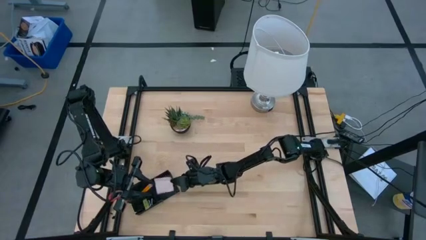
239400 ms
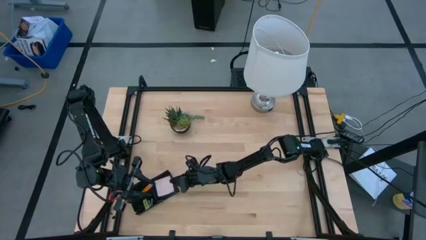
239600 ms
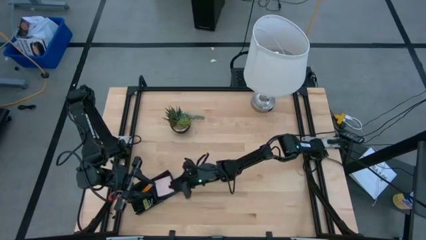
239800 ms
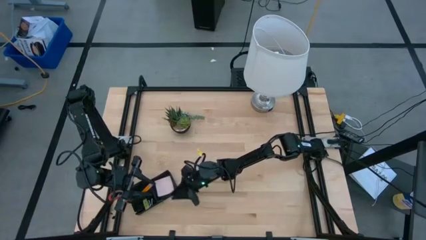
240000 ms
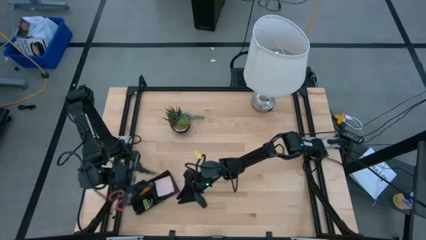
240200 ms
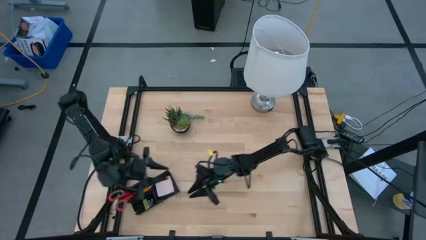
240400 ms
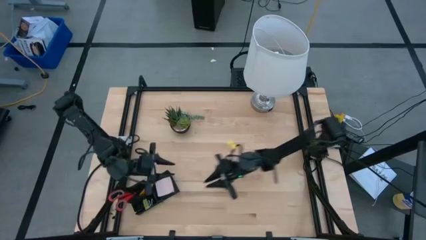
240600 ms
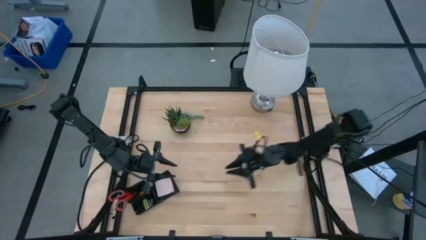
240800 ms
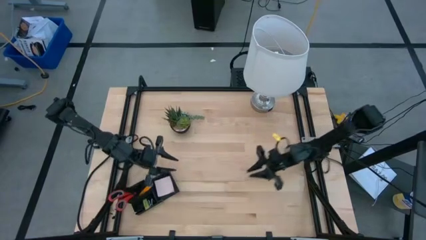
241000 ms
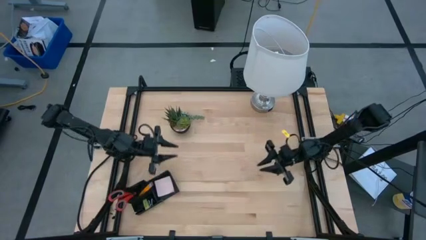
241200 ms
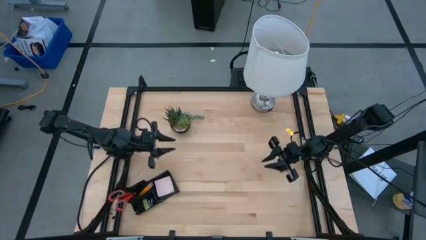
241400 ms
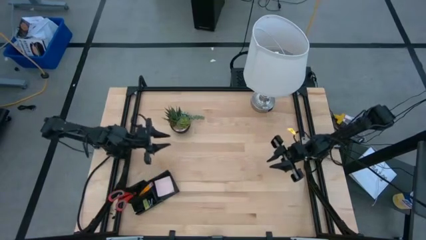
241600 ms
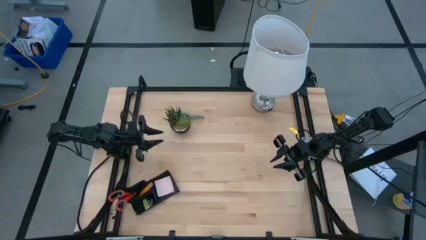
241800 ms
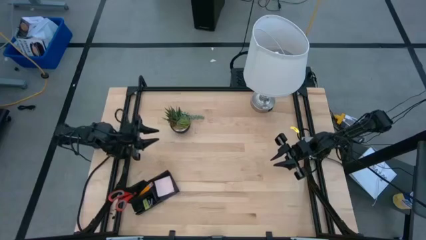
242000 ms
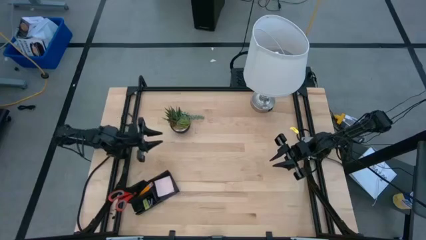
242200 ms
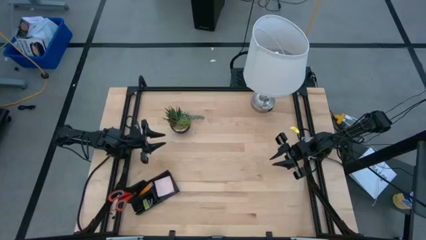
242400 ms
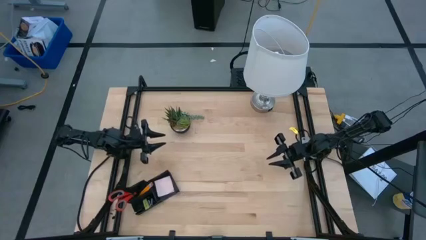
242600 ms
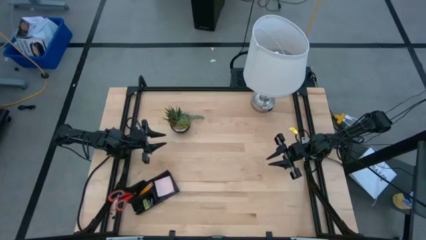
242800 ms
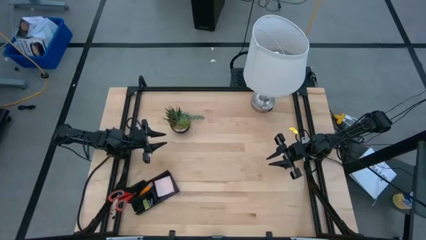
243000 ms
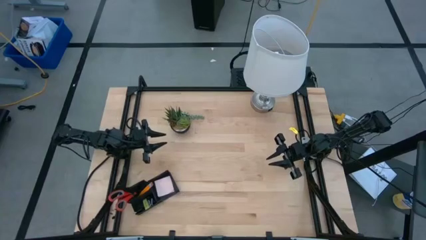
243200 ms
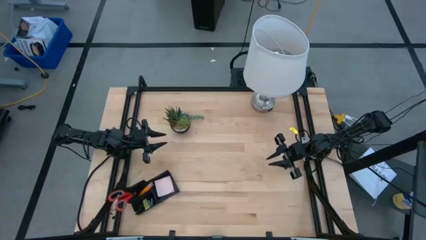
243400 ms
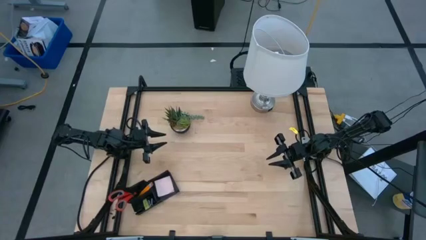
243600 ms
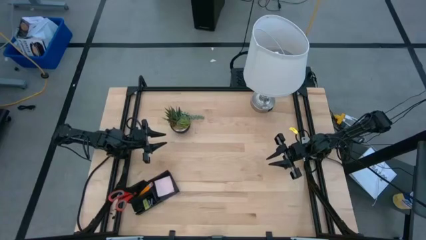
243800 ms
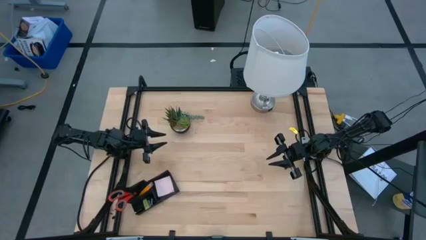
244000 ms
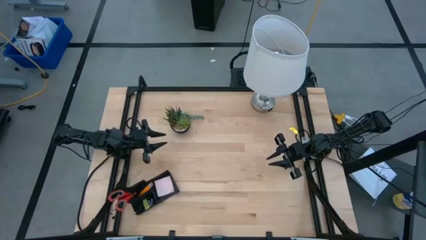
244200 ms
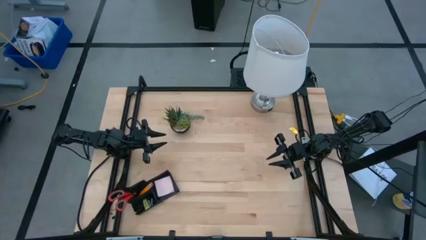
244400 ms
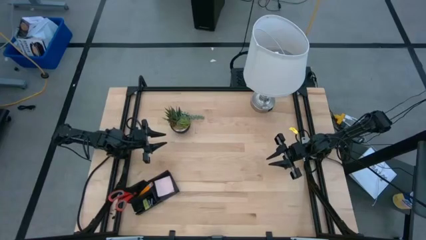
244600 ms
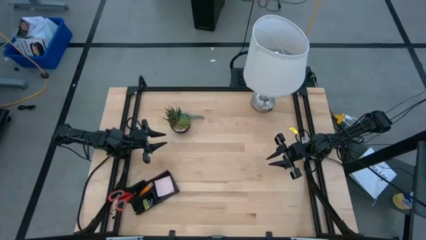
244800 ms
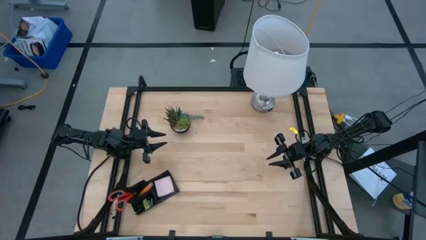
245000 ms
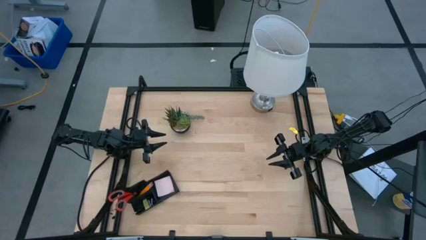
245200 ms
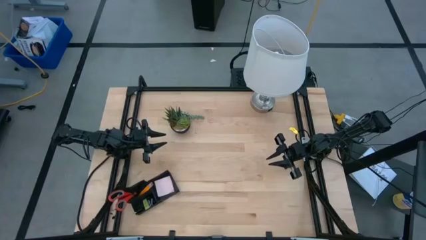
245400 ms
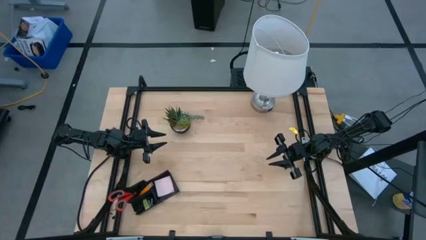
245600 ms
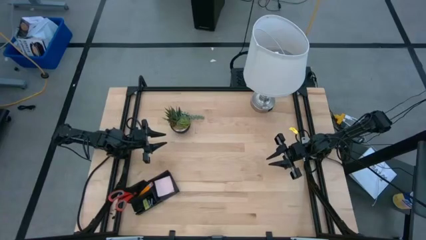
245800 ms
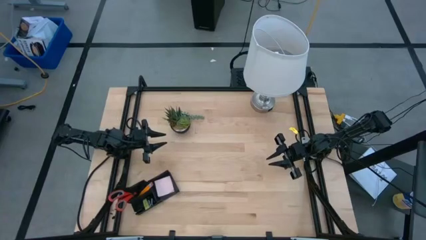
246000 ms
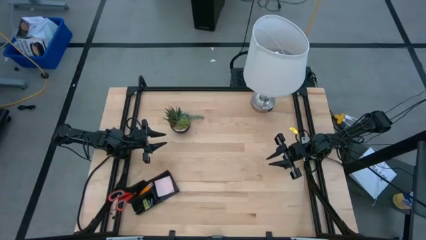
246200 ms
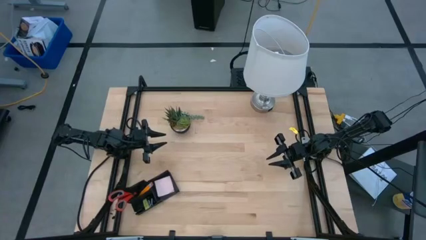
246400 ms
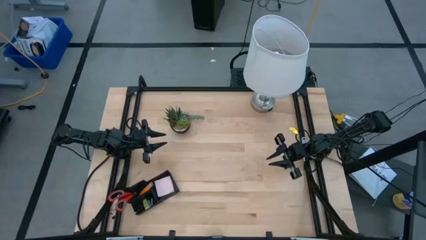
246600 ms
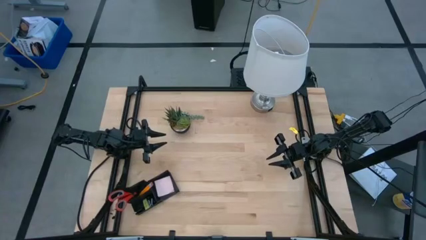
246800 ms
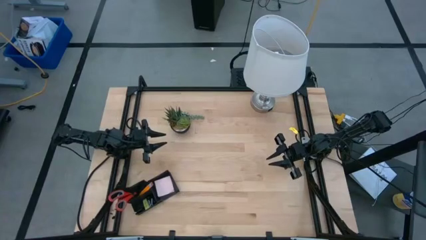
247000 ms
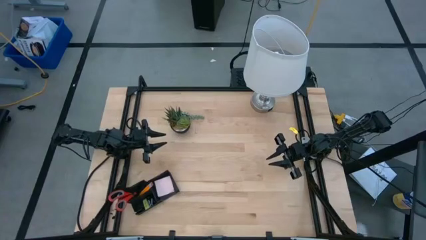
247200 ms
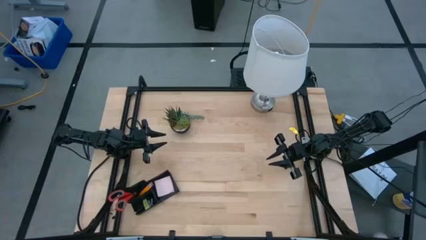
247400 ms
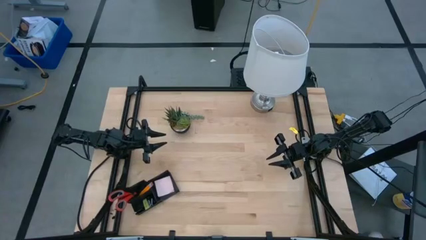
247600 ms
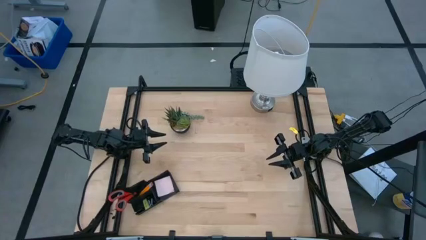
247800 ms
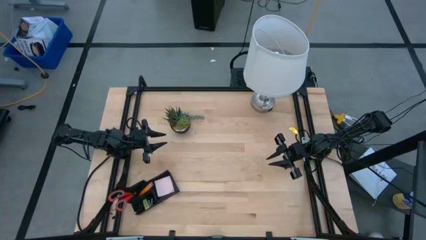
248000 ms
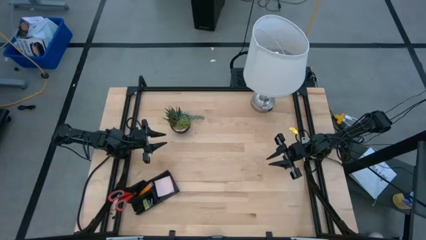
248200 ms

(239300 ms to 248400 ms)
Task: Pick and place office supplies into organizer
Return to Home Position

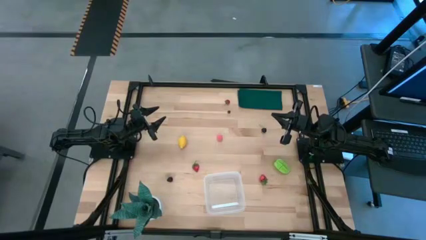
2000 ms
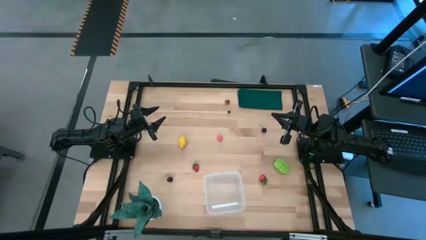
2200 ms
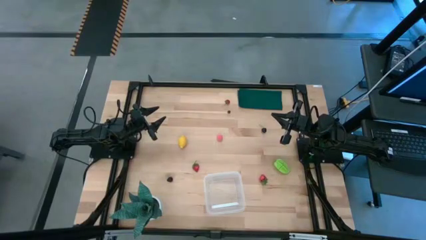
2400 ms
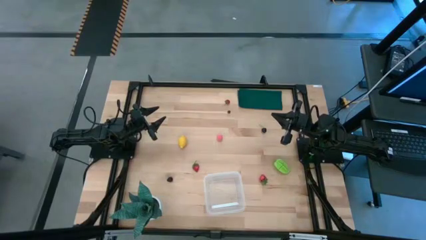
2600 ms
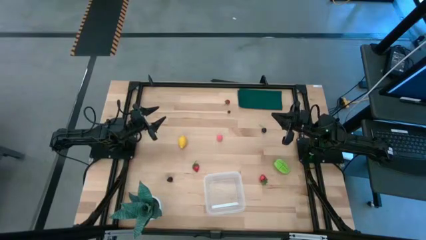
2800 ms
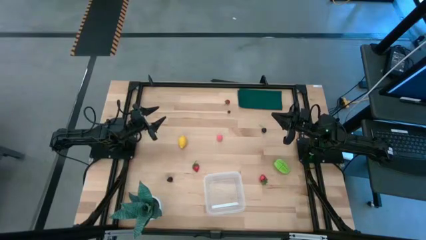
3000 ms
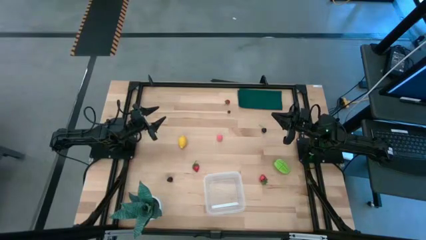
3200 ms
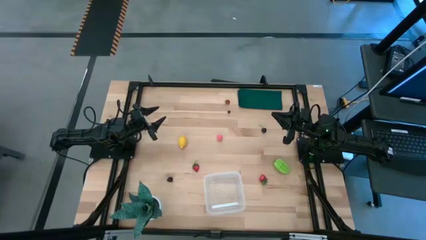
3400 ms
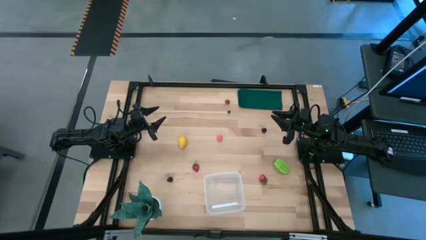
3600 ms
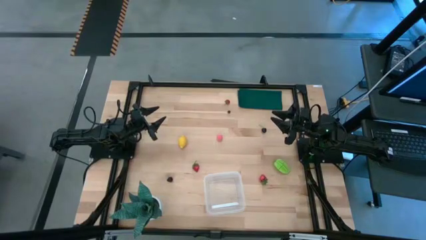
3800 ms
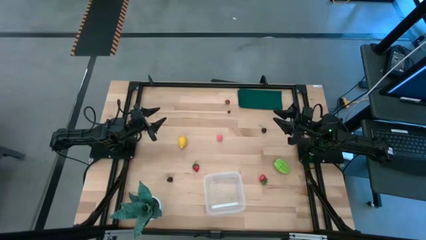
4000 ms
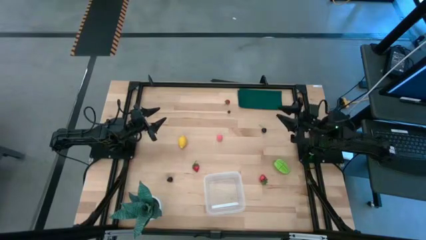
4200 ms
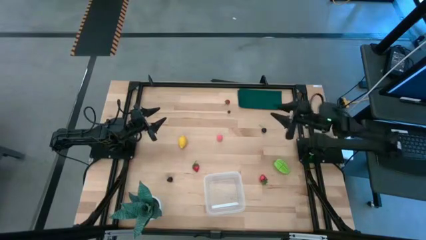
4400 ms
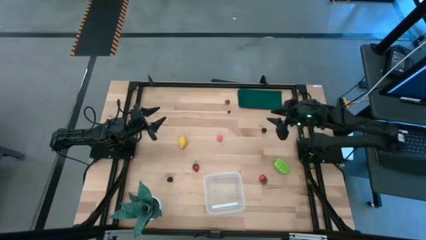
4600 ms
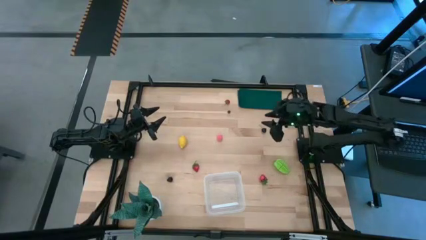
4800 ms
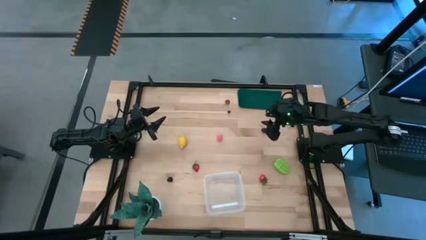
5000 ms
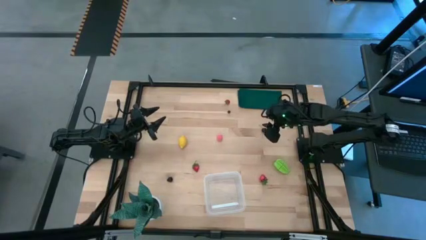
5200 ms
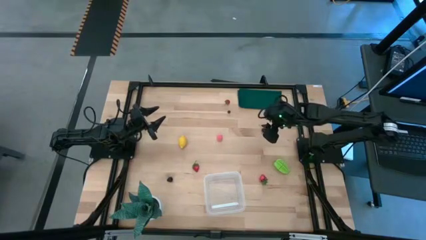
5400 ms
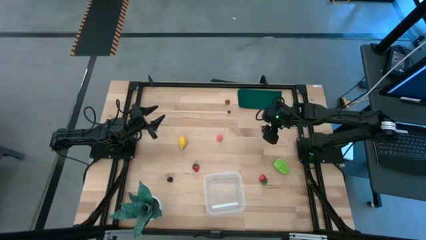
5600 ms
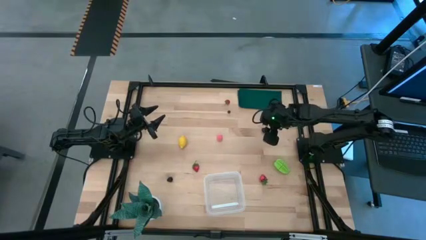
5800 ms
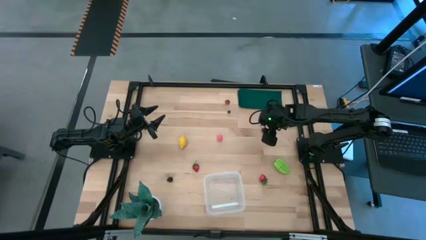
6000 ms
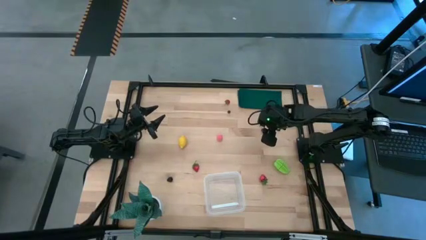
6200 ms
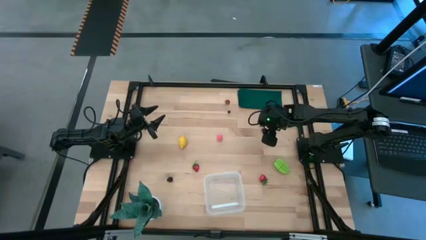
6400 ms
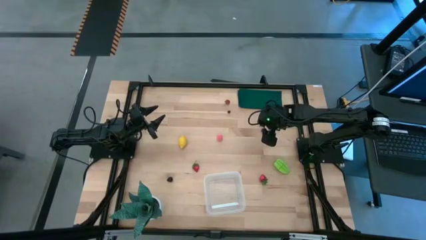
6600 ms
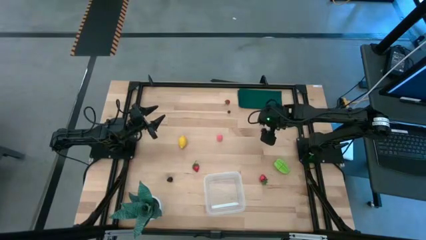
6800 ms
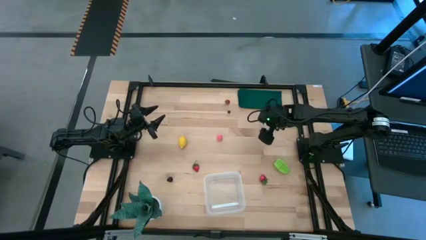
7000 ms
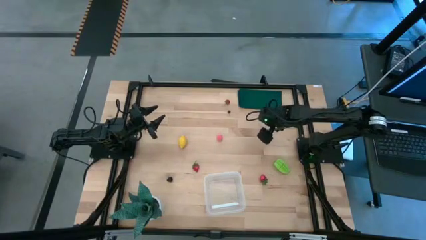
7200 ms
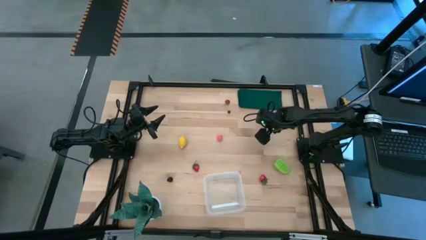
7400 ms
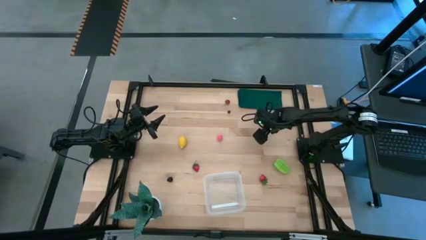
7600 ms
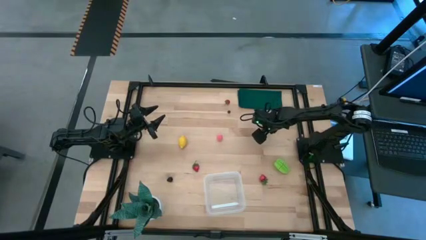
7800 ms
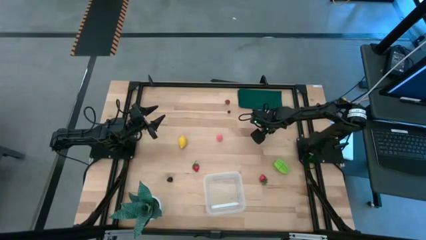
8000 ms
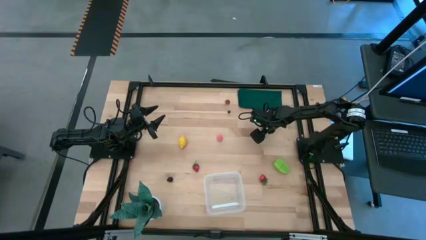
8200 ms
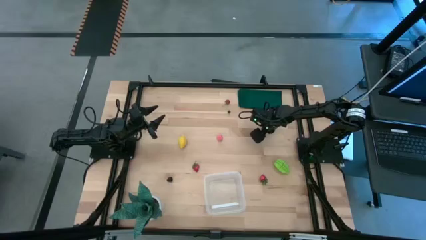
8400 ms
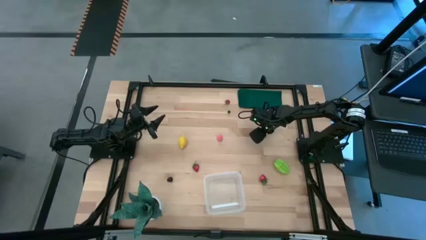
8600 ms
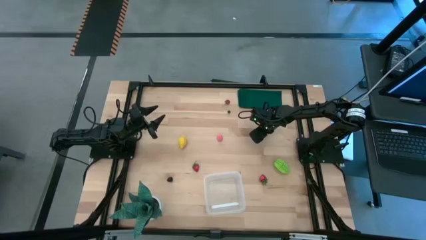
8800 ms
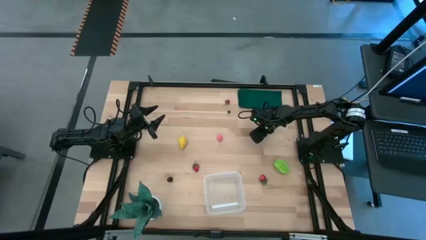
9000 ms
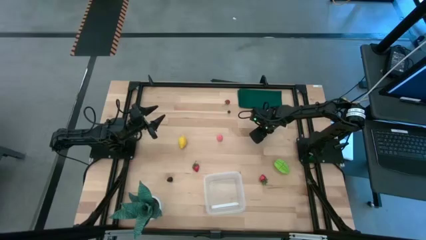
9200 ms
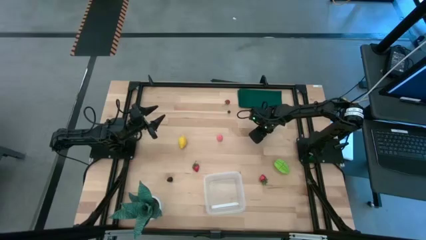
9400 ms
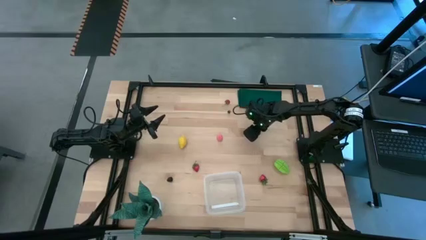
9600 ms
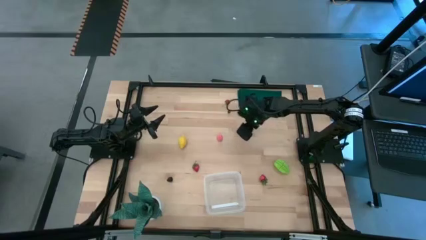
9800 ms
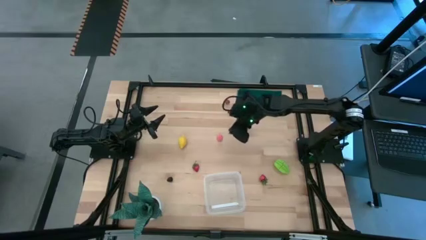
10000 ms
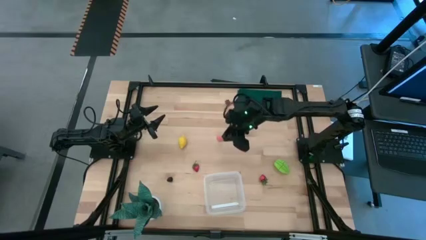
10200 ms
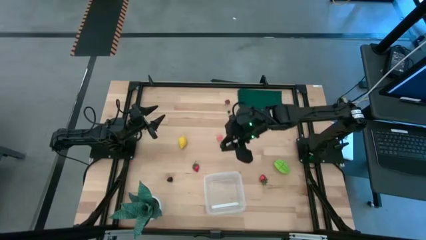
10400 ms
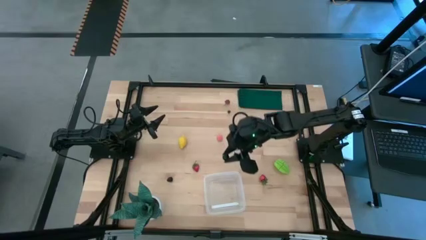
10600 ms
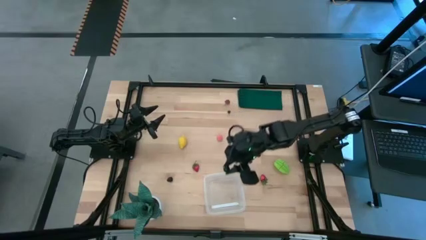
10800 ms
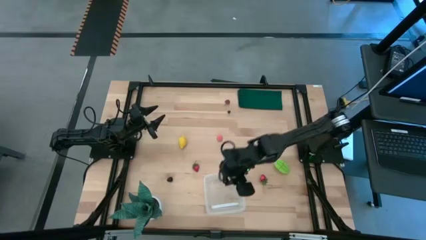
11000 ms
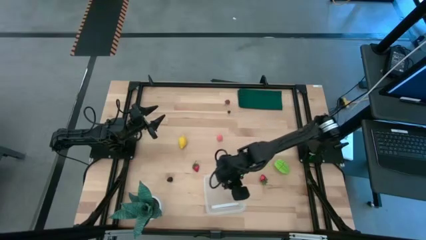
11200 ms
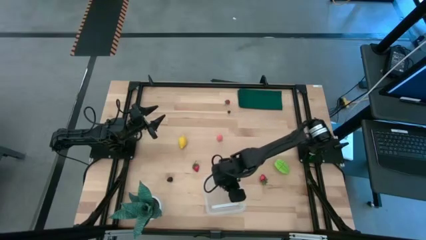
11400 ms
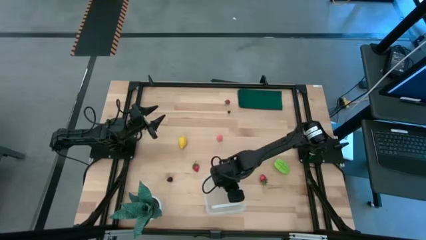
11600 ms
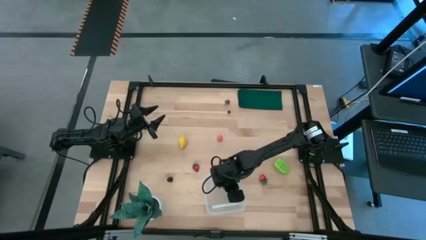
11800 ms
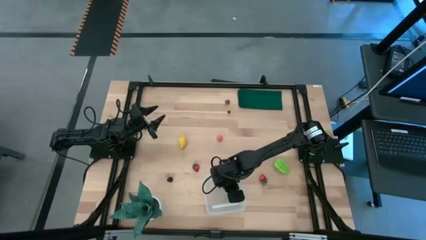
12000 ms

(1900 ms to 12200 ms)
Task: Pick and placing Produce into tupperware
Put the black cherry into the transparent bin
